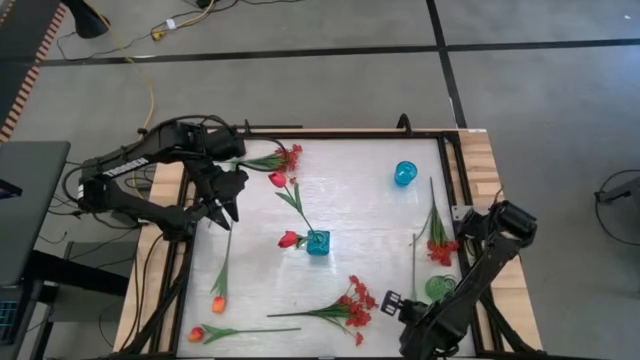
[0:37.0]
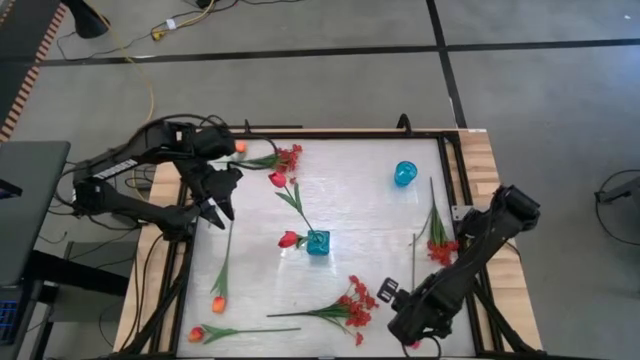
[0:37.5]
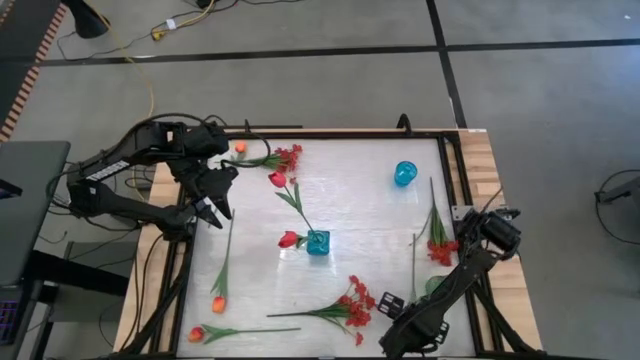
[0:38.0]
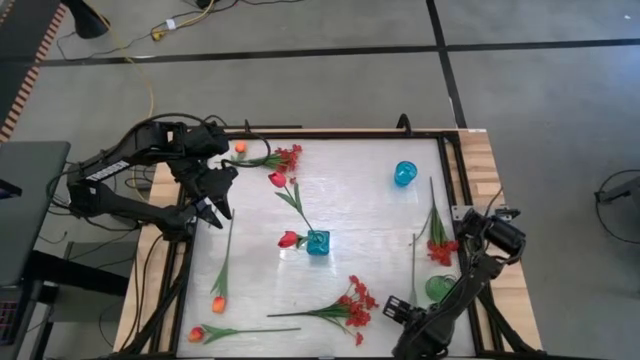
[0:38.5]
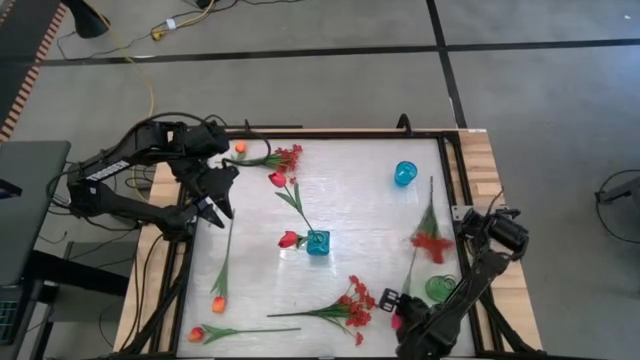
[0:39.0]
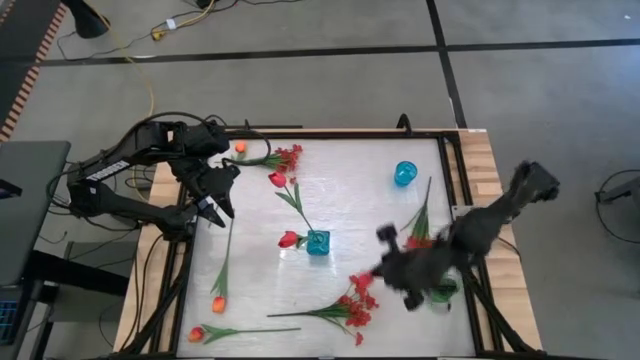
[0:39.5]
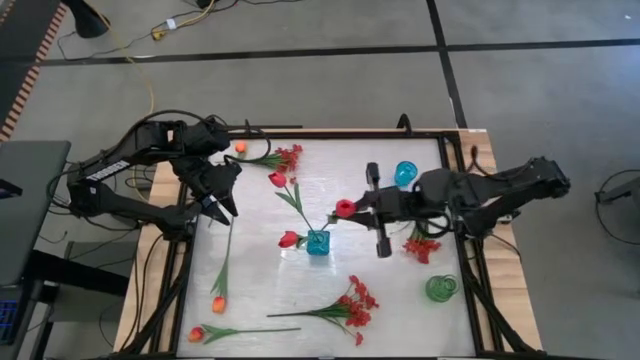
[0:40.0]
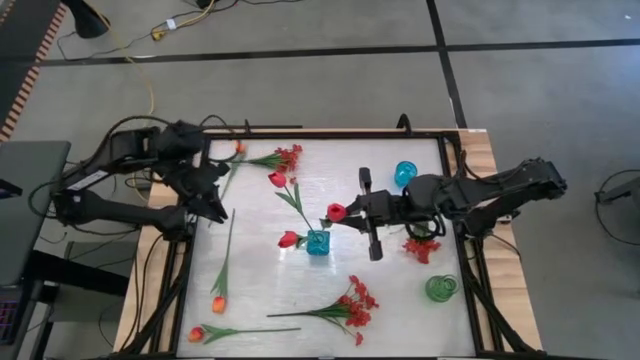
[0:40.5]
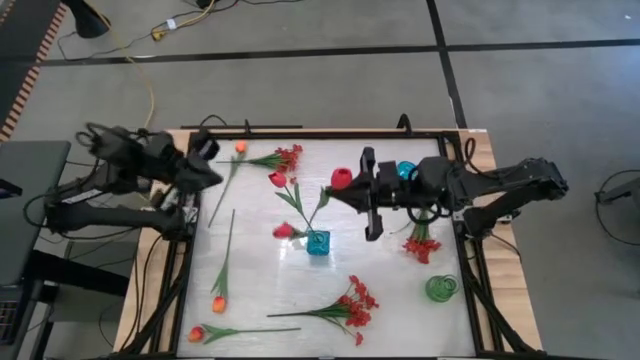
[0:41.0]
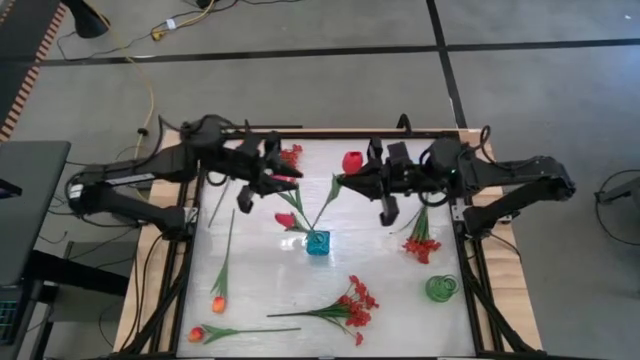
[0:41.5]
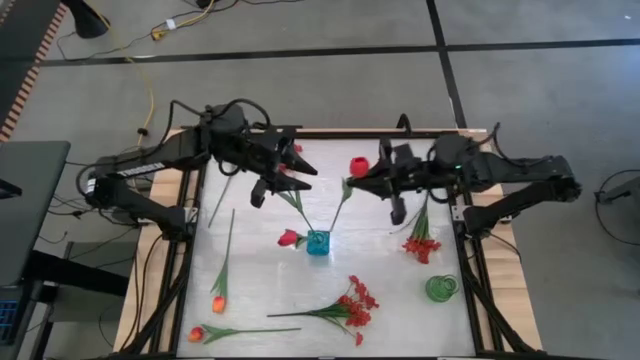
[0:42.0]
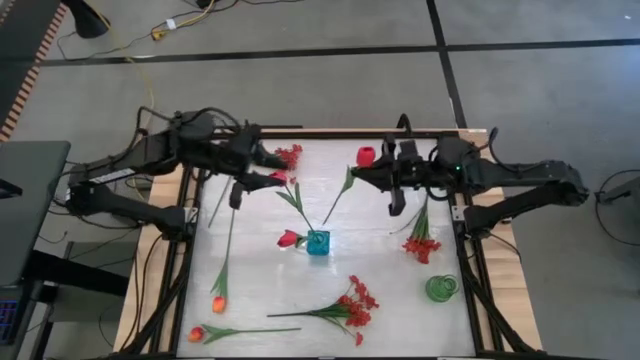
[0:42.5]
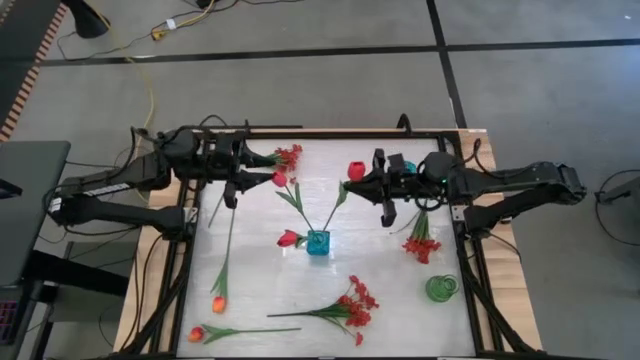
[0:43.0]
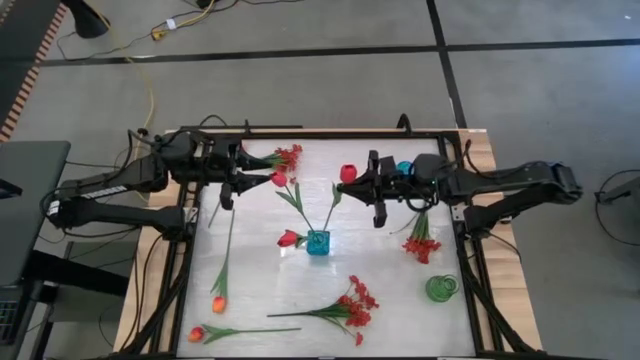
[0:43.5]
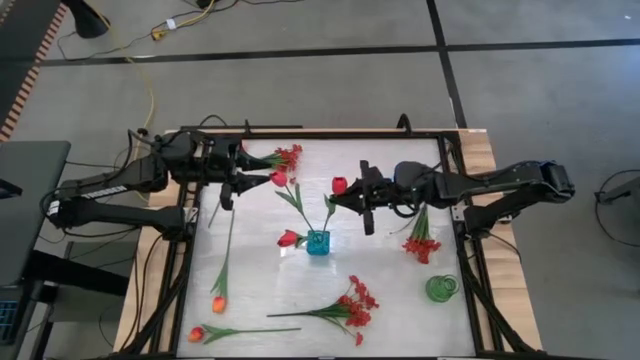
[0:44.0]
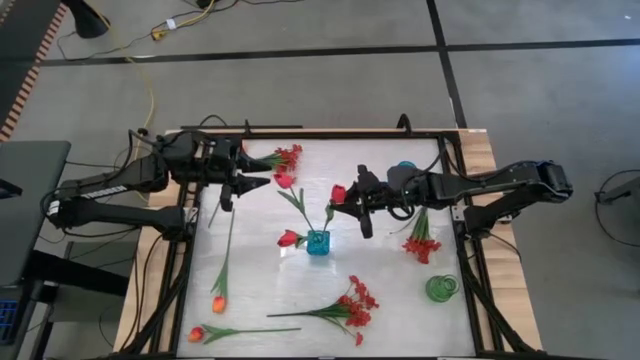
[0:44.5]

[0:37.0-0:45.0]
Task: Sort flowers into vase by color
Put the pink flower into the bottom blue vase

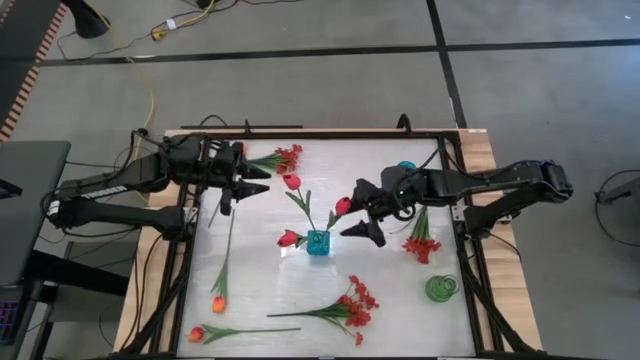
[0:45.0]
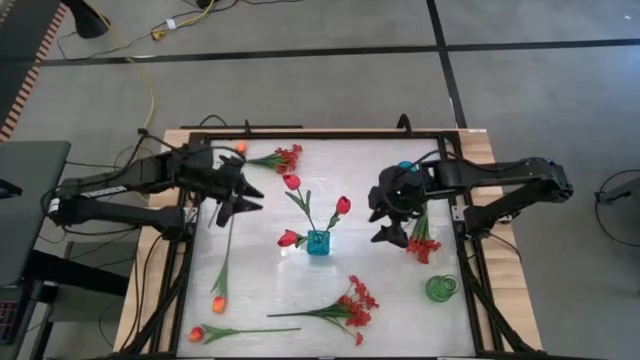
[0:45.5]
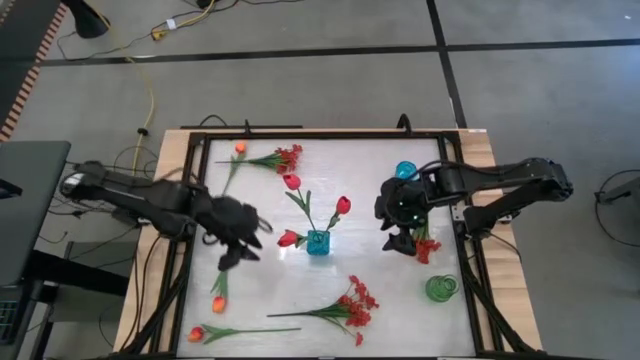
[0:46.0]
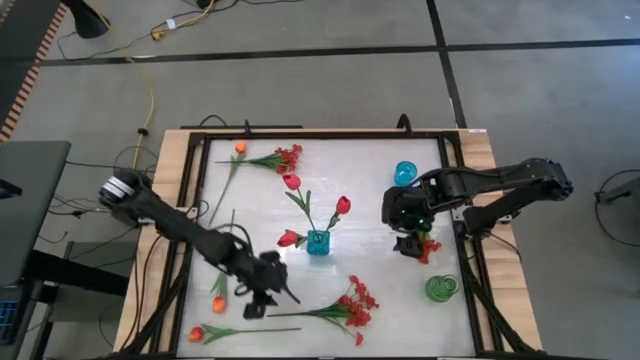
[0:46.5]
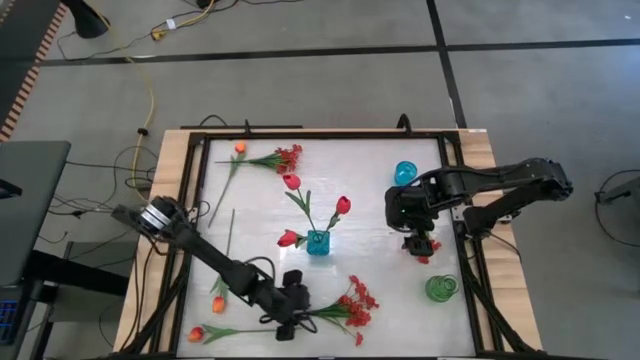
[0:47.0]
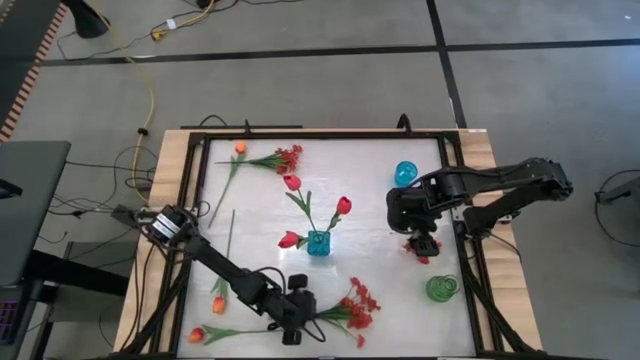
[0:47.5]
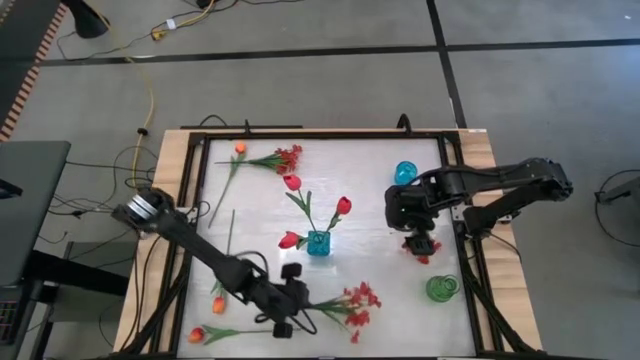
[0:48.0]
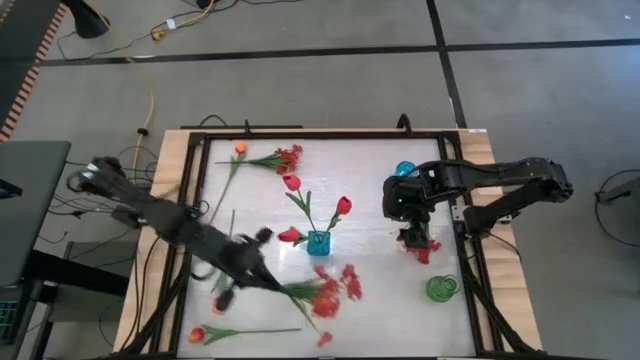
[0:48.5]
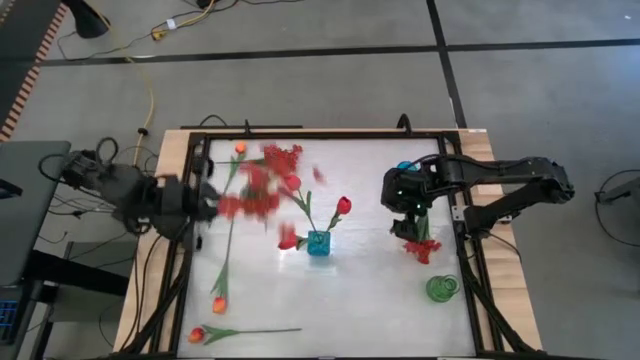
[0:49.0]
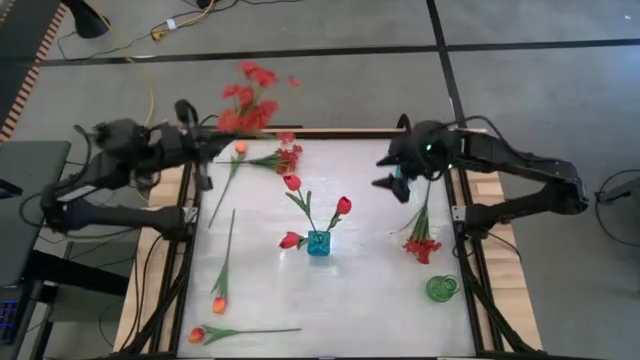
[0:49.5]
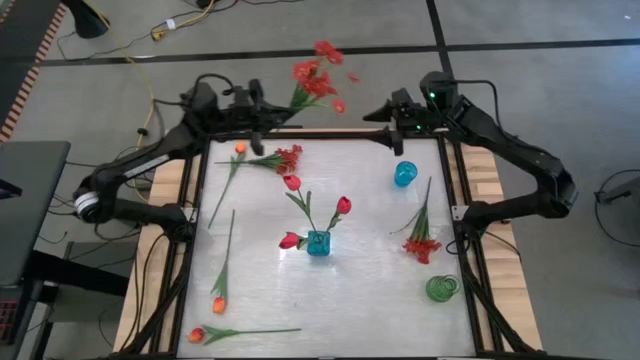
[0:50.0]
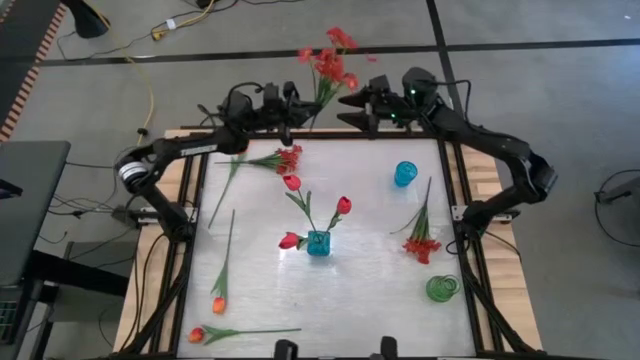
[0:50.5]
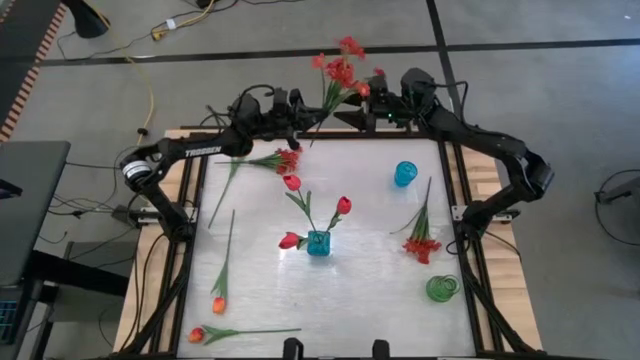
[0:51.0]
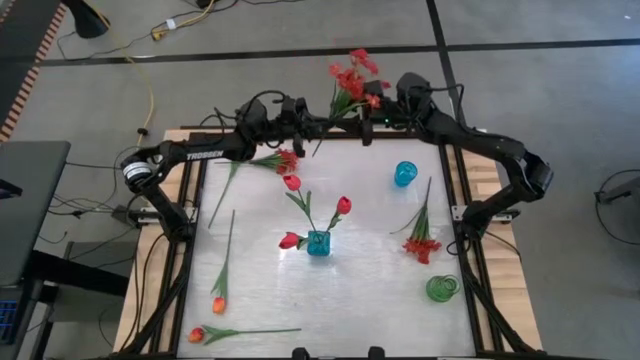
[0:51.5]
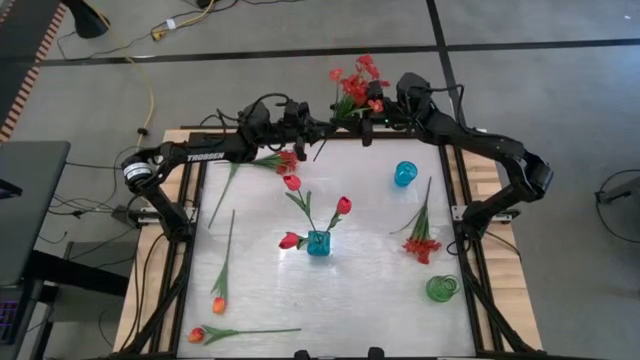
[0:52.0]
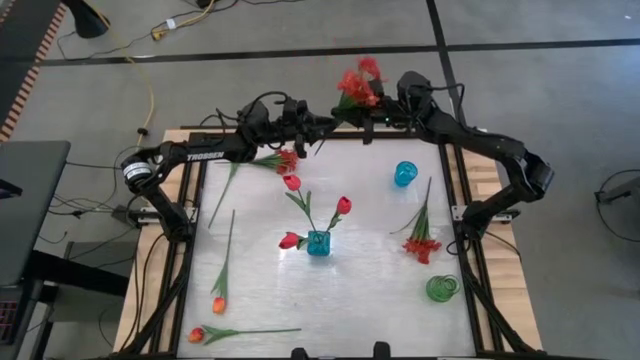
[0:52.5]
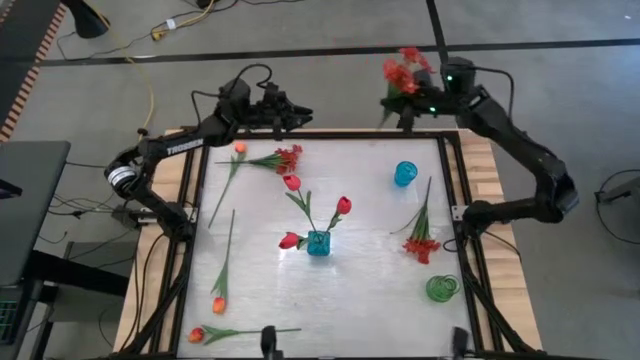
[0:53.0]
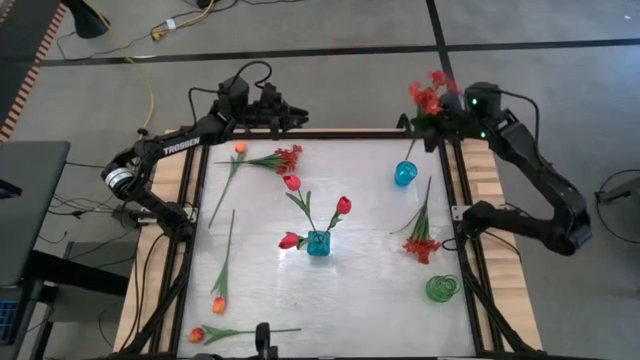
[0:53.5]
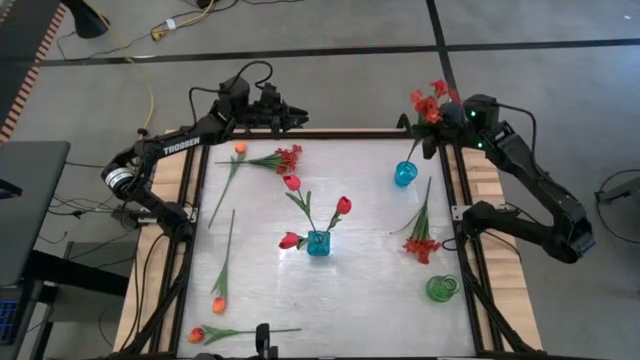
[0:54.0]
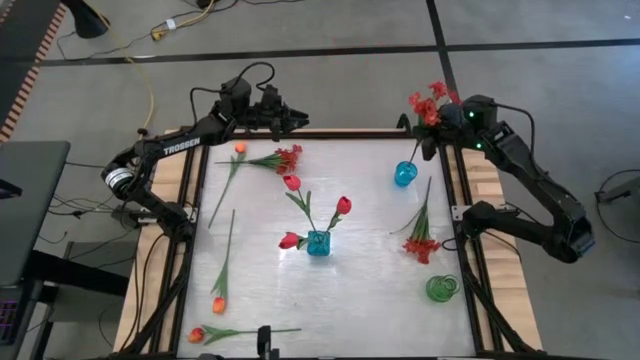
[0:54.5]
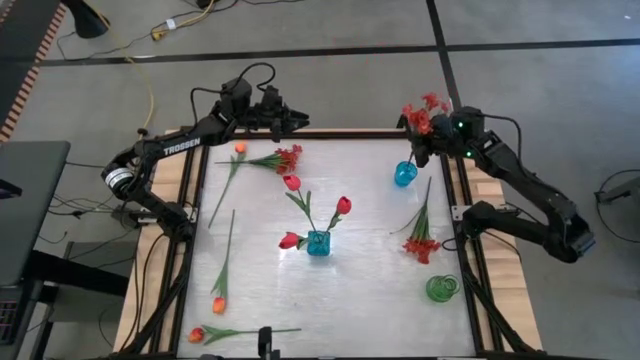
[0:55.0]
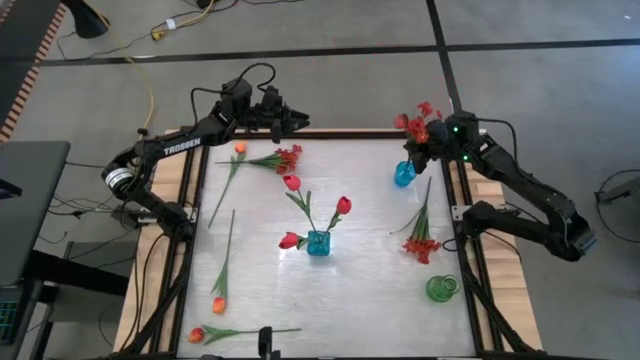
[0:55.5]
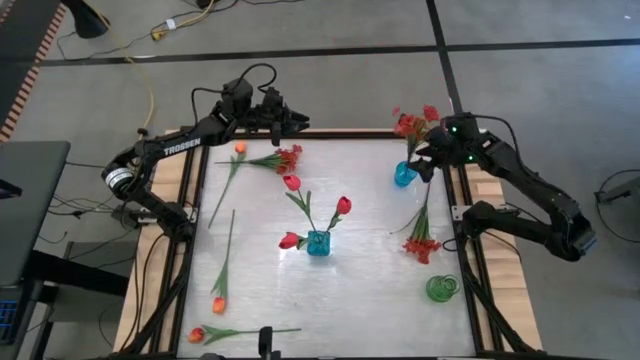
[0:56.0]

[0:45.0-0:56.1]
Put the bottom orange flowers into the top blue vase

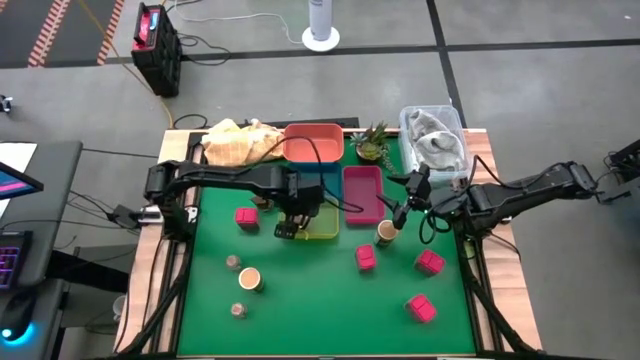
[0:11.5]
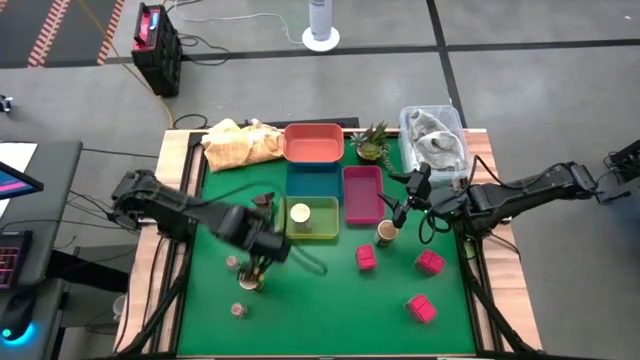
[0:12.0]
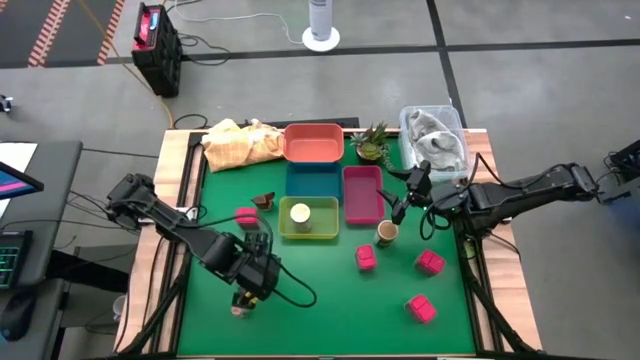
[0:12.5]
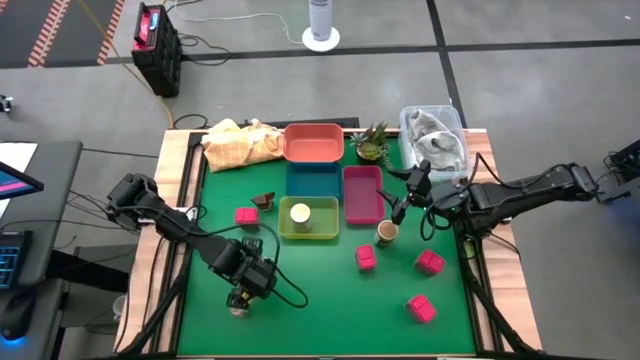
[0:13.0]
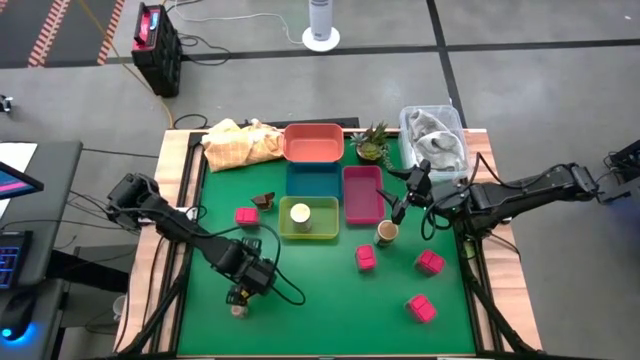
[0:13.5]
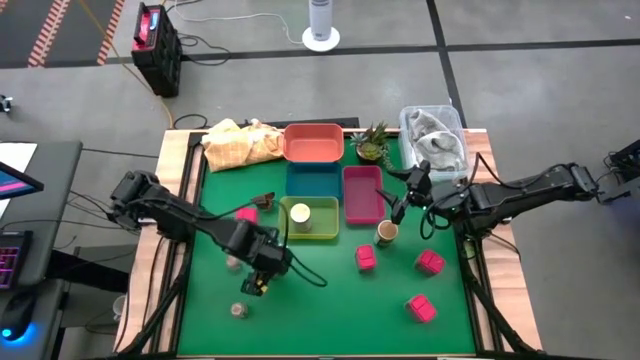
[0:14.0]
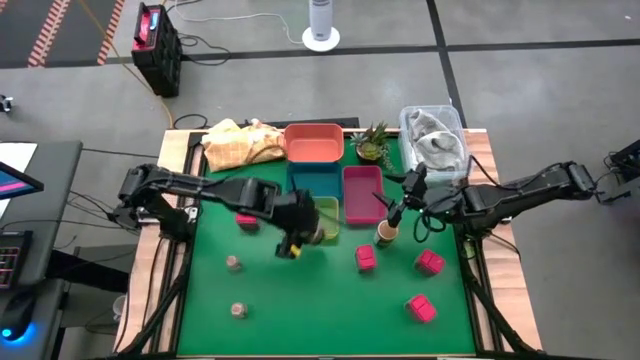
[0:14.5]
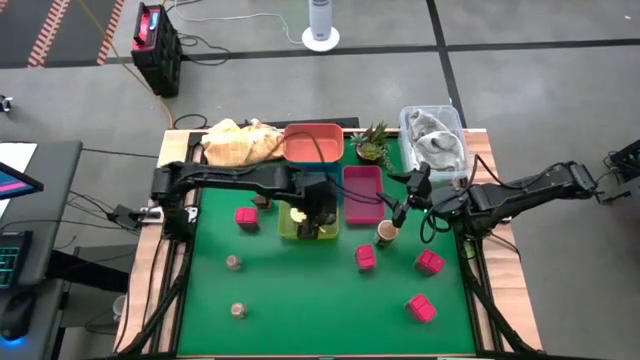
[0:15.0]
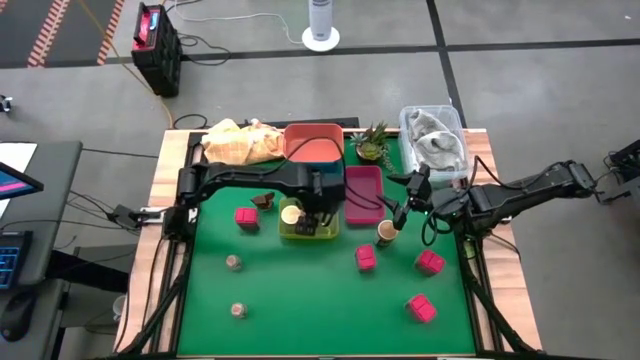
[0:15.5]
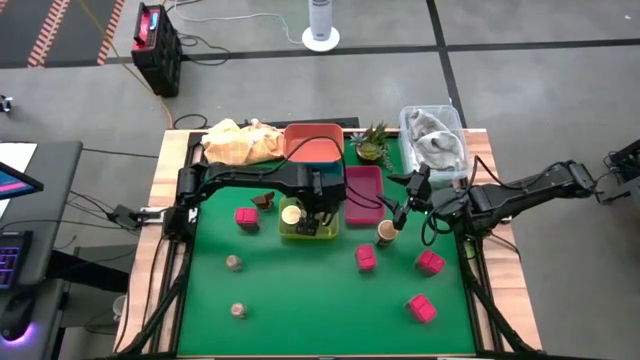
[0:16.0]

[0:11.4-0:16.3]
Task: Sort spices by type
Put the left brown seasoning bottle into the yellow bin
